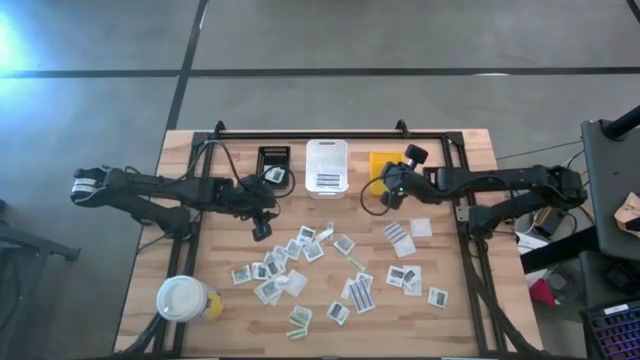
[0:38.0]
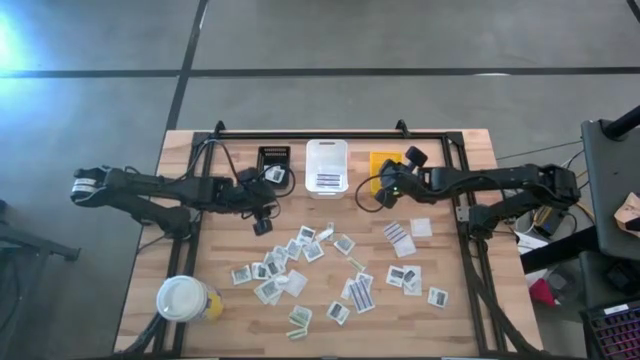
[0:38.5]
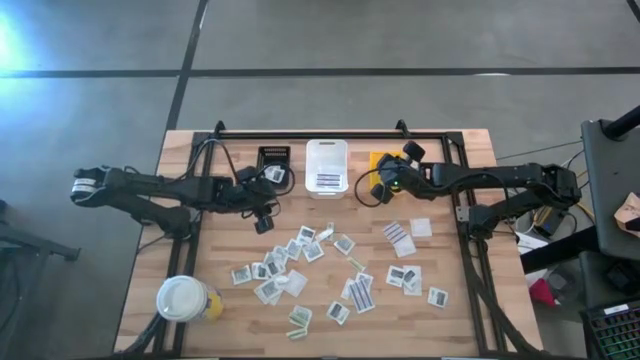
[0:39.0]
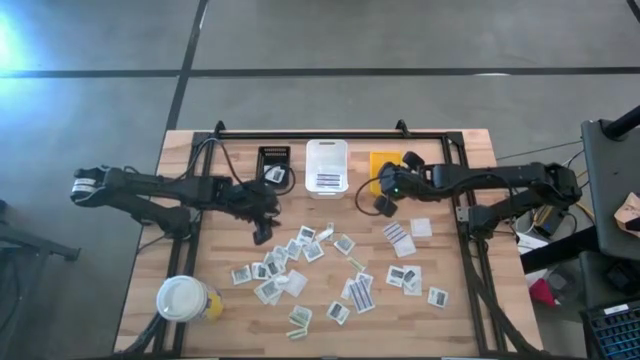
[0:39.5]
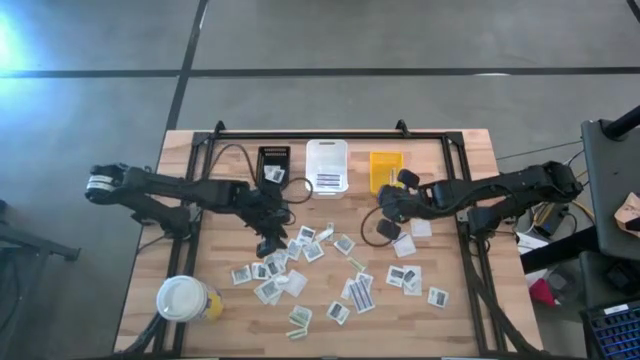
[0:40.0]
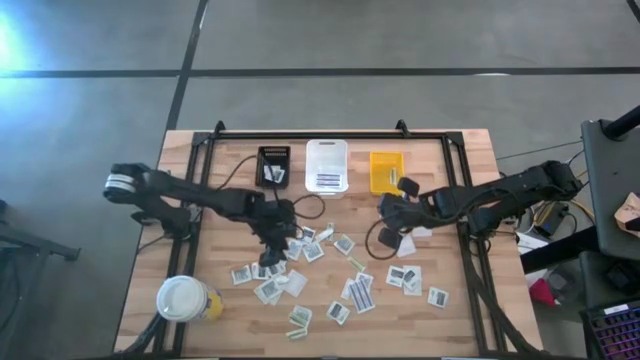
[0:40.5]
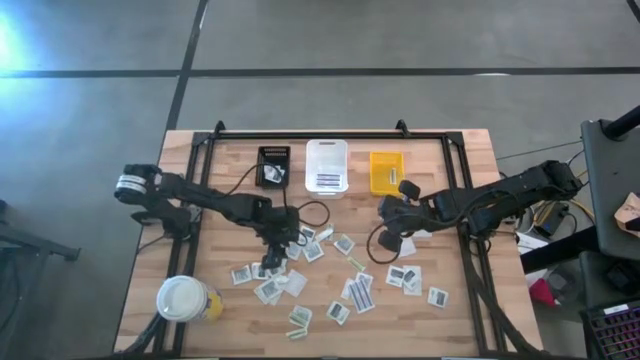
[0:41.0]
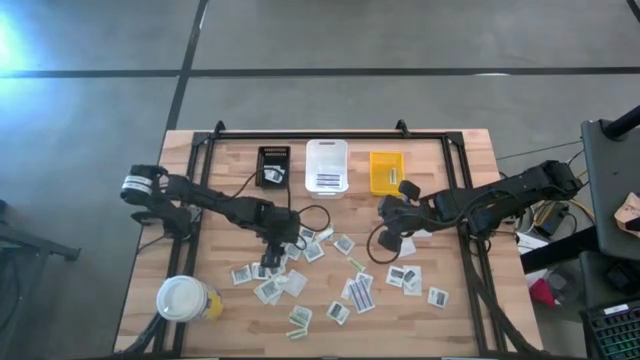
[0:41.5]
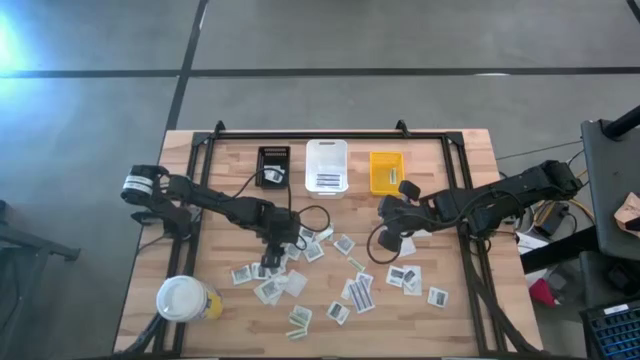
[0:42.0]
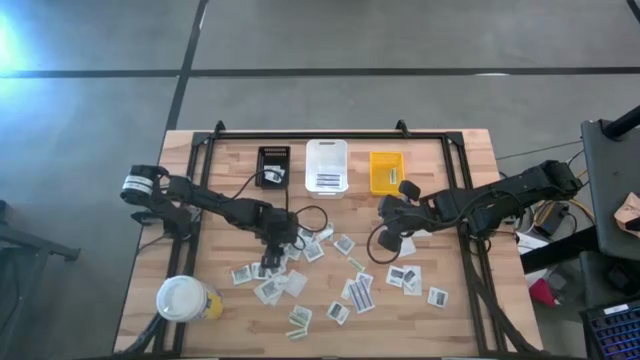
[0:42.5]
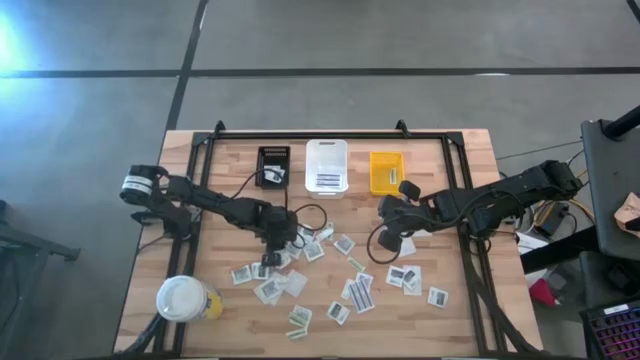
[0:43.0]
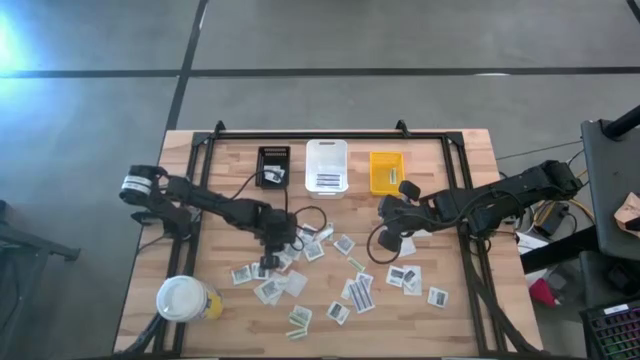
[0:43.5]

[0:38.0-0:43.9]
Task: Pick & Place First Aid Supplies
Put the towelette pack into the black basket

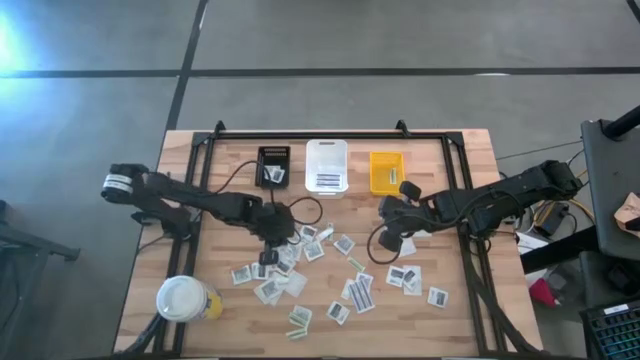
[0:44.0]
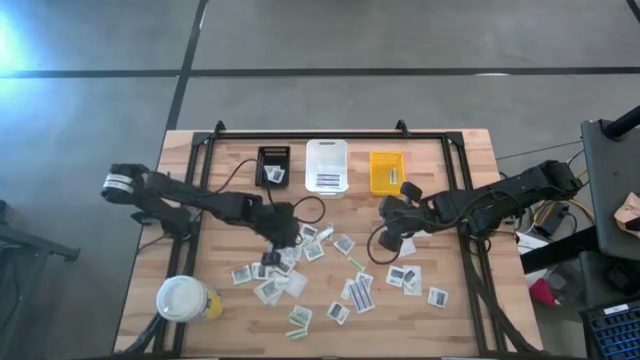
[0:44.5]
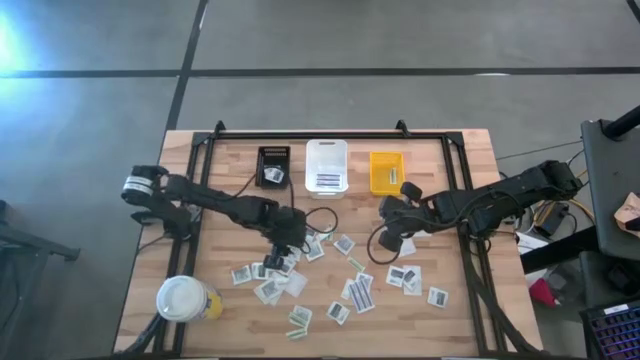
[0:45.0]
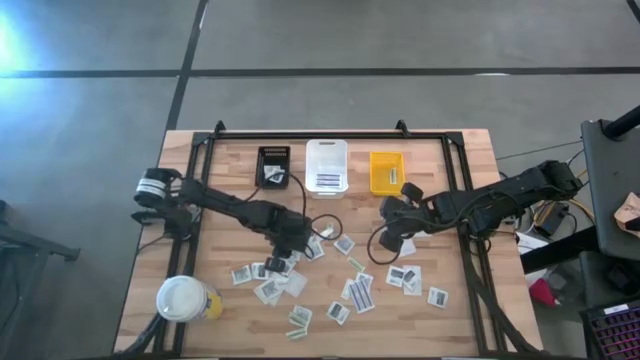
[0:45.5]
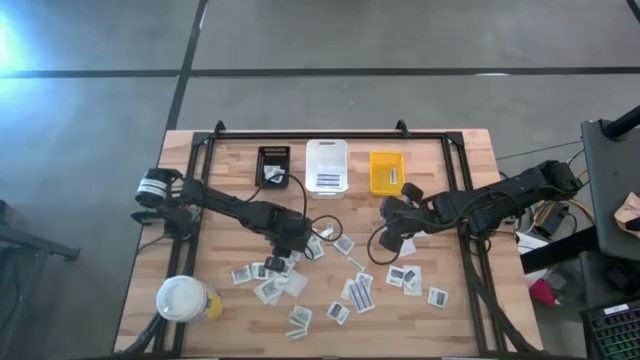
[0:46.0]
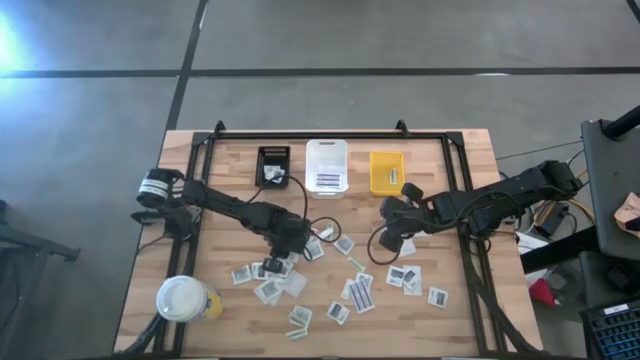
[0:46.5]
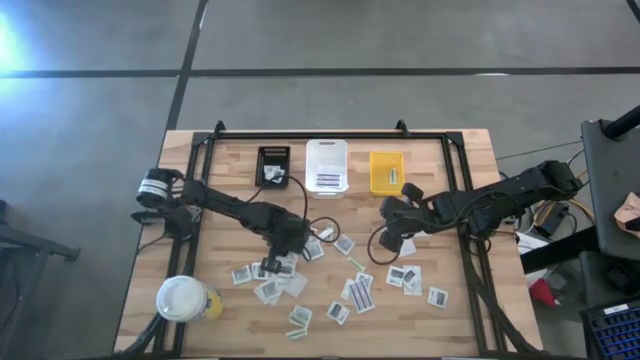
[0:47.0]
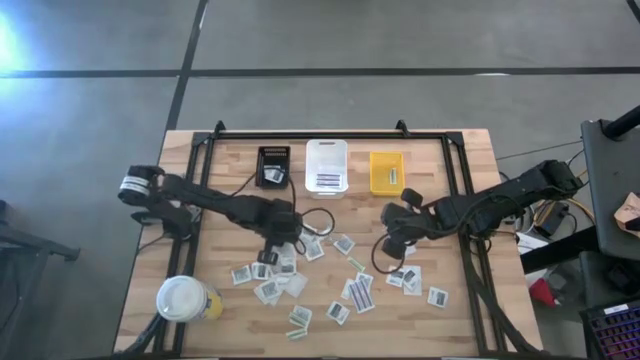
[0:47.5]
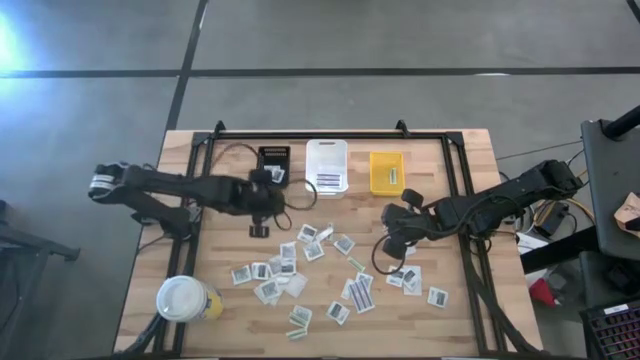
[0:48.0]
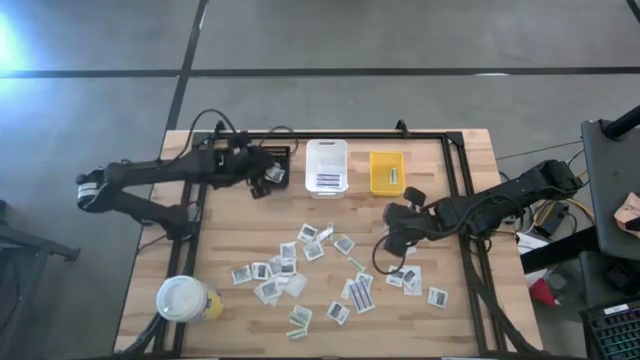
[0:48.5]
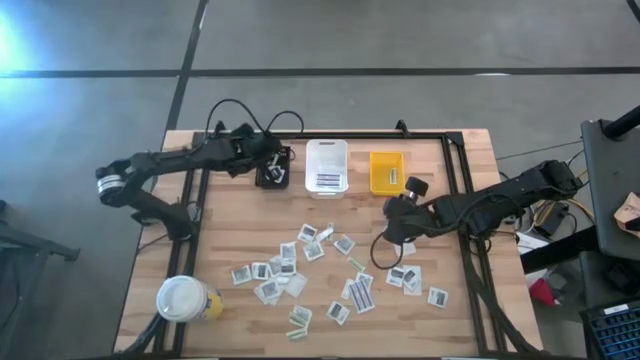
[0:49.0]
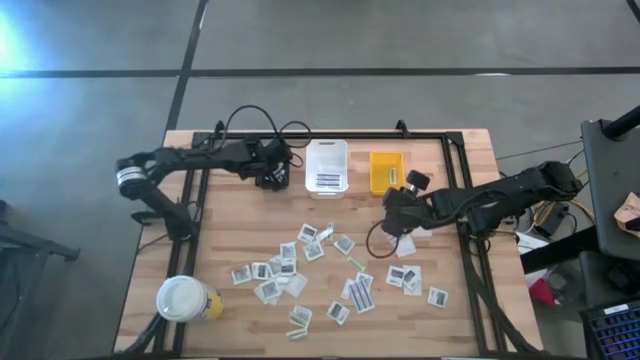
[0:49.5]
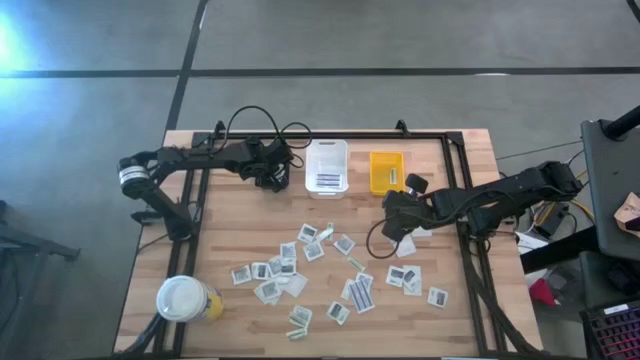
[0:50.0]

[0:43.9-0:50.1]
Put the towelette pack into the black basket

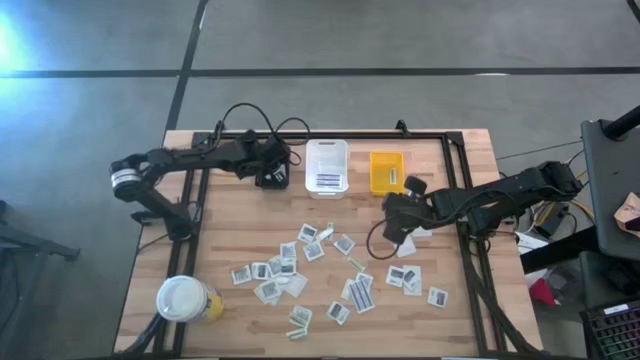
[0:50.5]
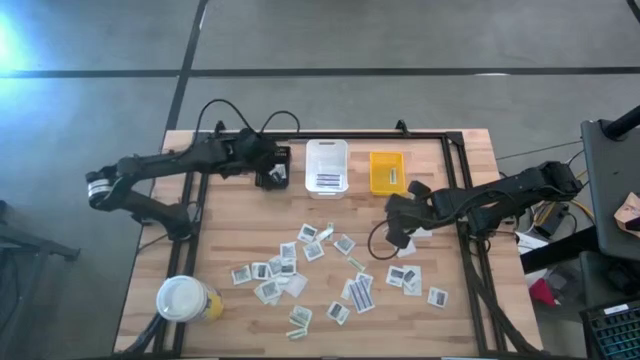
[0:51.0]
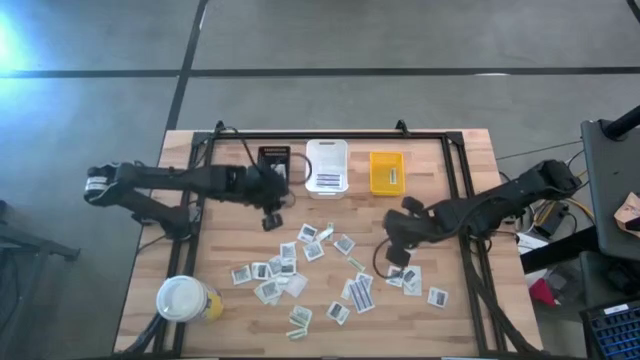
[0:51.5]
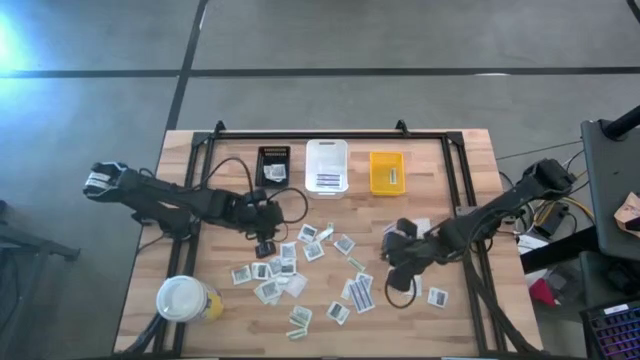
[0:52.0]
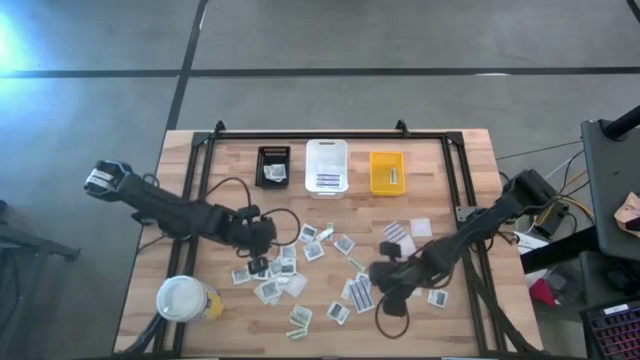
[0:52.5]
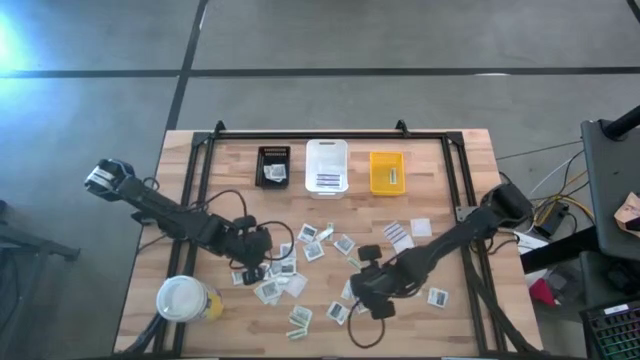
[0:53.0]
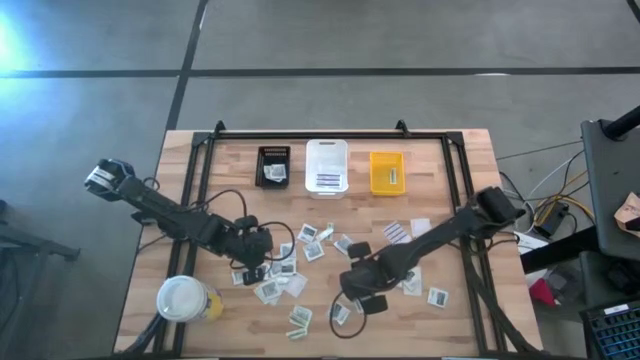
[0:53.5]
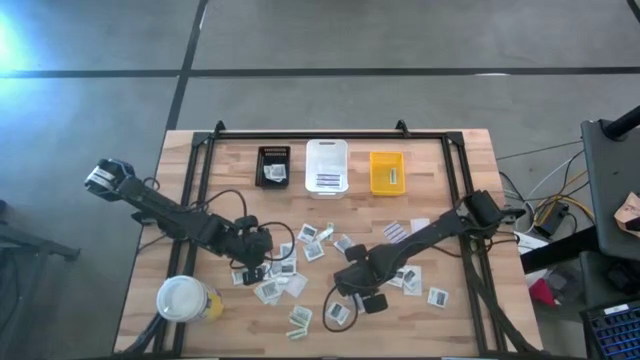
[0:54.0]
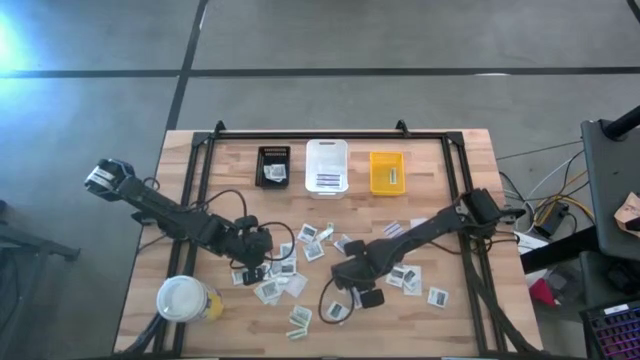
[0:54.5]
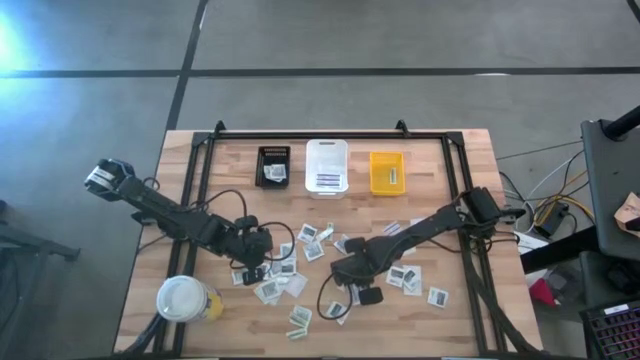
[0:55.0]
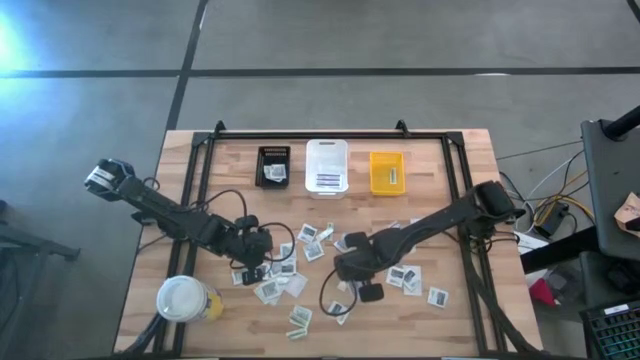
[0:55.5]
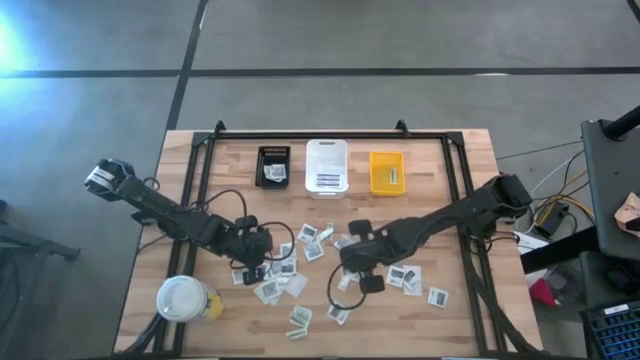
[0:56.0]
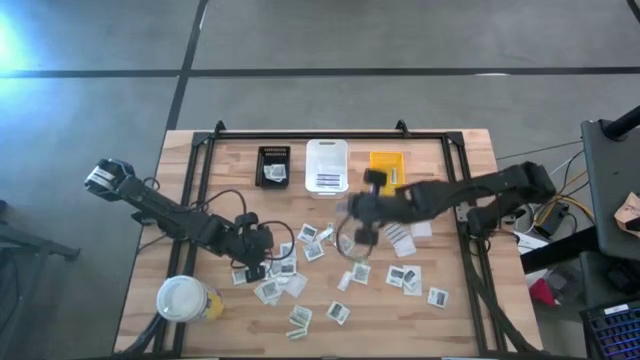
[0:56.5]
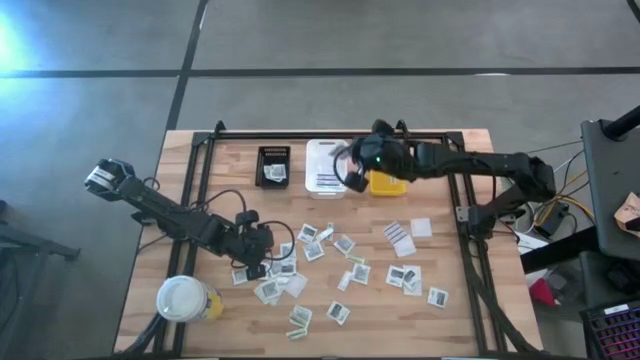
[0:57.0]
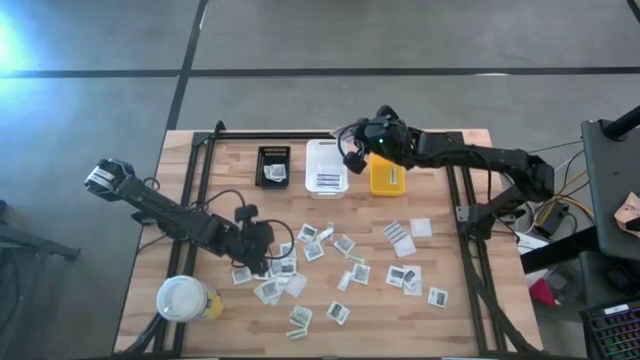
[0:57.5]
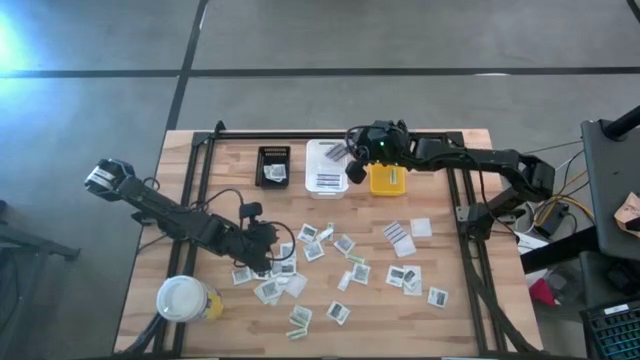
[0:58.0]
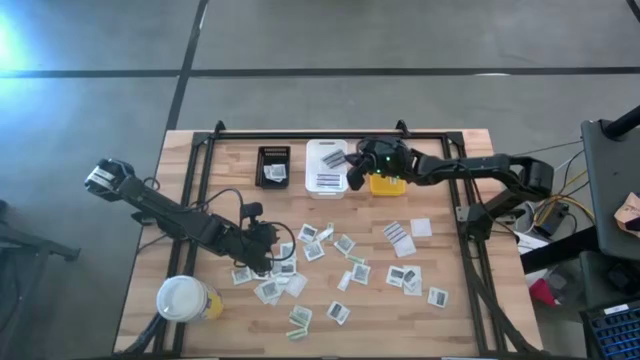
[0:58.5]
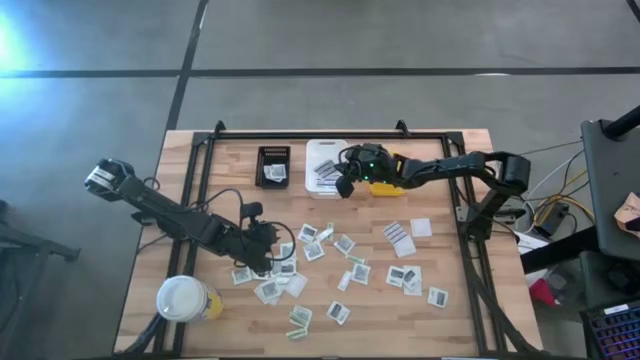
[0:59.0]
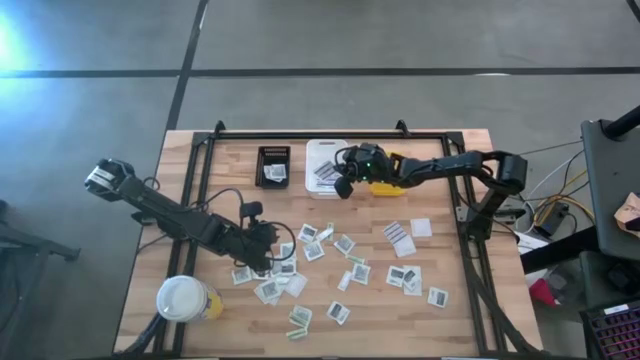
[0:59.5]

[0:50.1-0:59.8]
Put the blue bandage into the white bin
